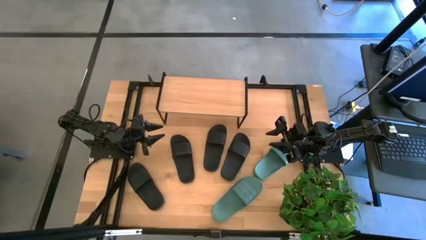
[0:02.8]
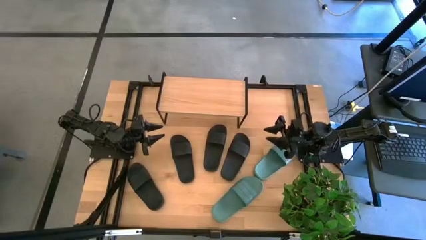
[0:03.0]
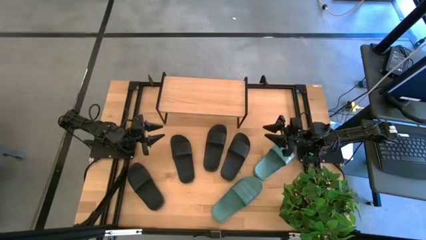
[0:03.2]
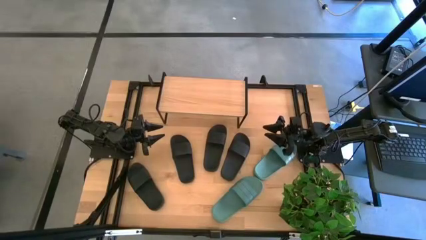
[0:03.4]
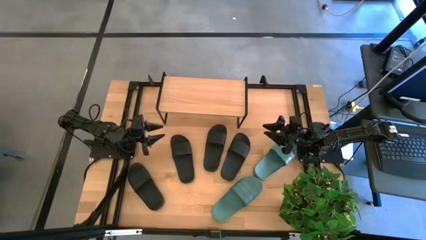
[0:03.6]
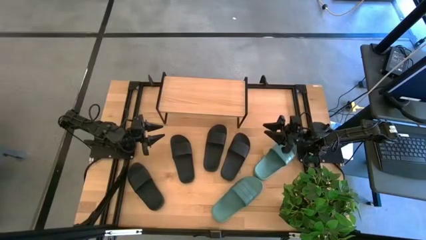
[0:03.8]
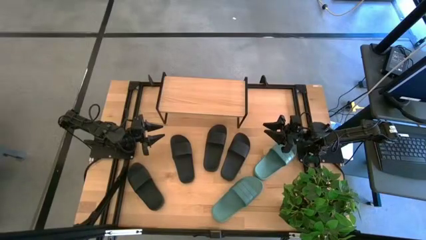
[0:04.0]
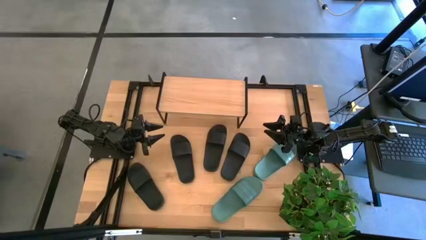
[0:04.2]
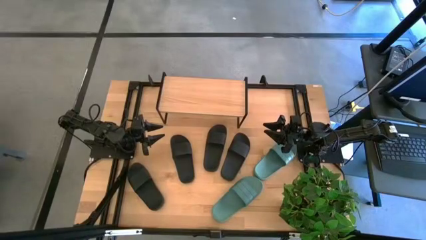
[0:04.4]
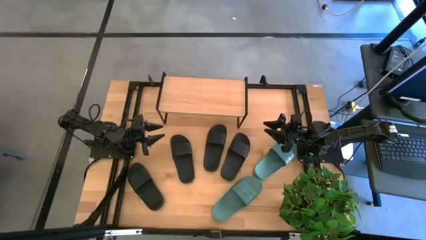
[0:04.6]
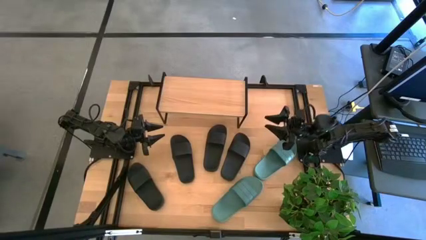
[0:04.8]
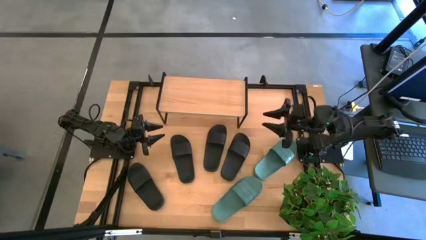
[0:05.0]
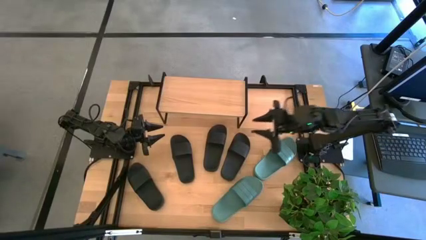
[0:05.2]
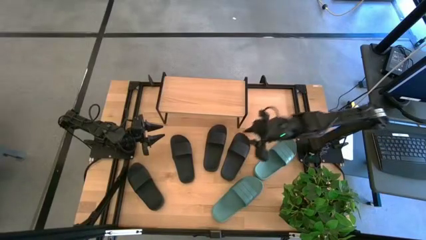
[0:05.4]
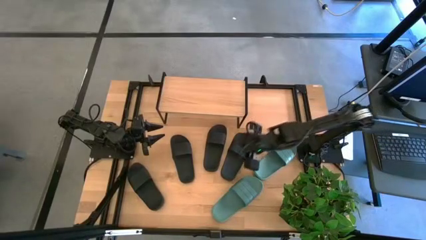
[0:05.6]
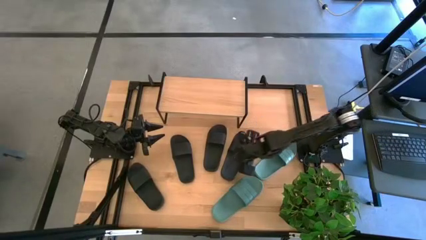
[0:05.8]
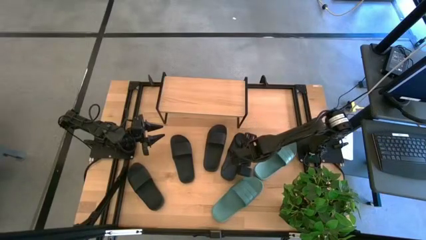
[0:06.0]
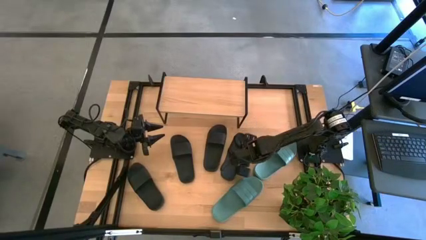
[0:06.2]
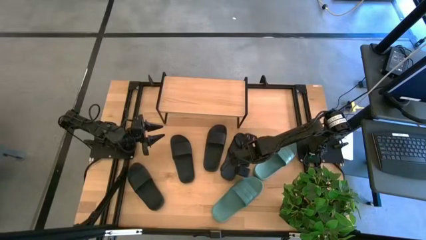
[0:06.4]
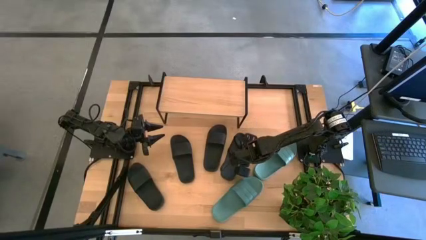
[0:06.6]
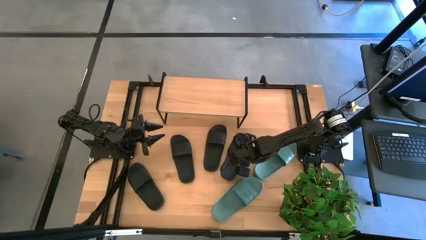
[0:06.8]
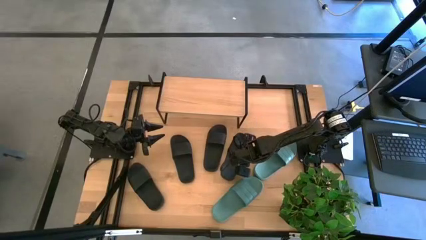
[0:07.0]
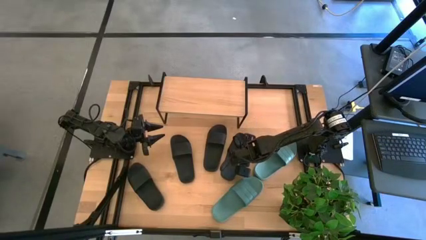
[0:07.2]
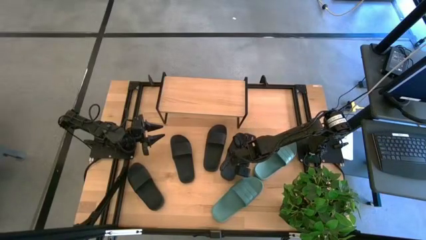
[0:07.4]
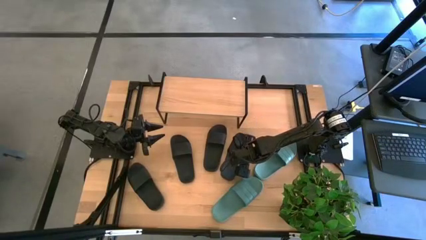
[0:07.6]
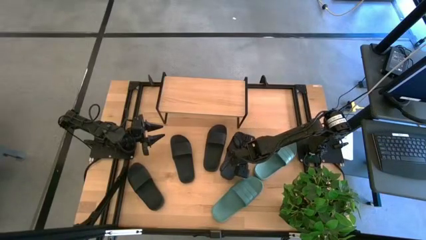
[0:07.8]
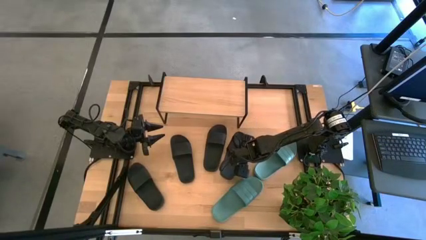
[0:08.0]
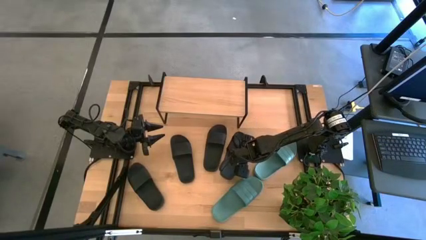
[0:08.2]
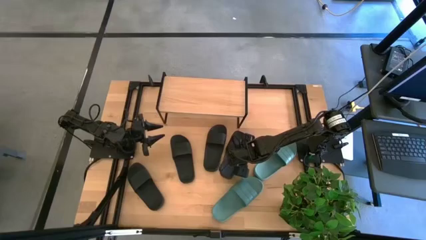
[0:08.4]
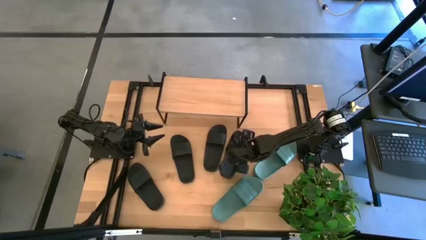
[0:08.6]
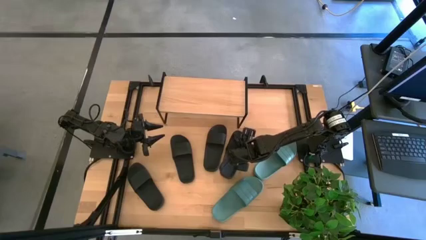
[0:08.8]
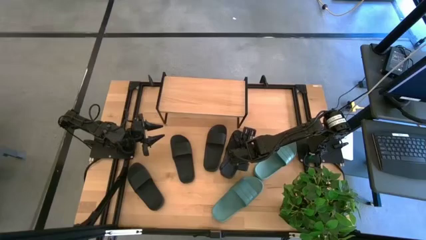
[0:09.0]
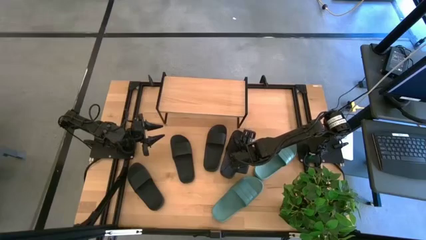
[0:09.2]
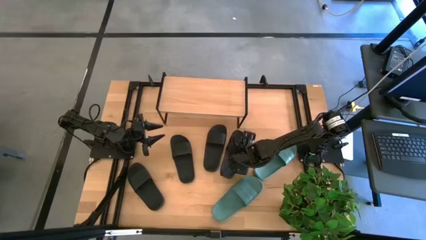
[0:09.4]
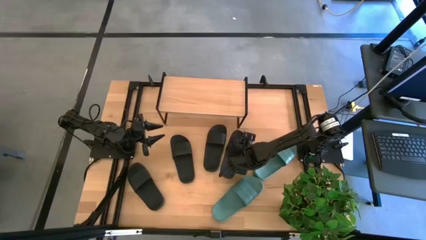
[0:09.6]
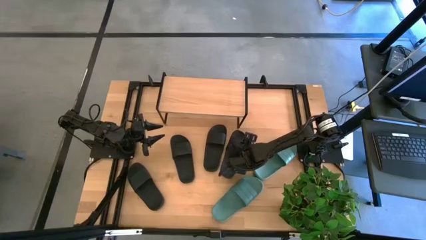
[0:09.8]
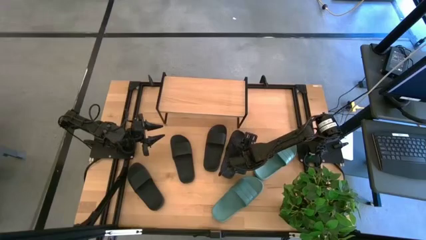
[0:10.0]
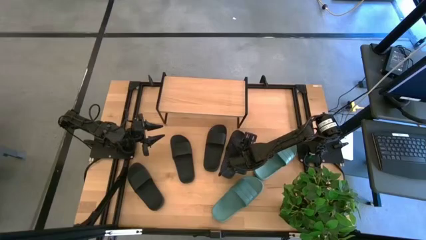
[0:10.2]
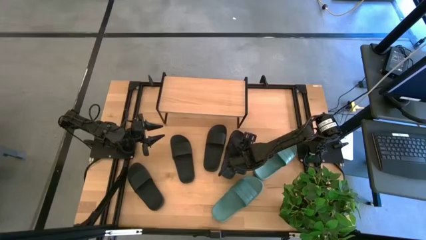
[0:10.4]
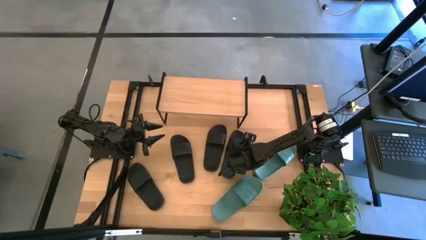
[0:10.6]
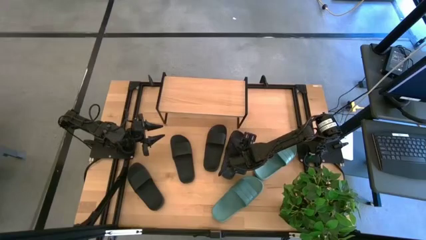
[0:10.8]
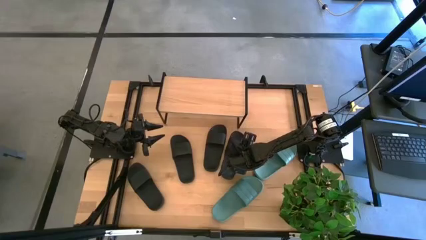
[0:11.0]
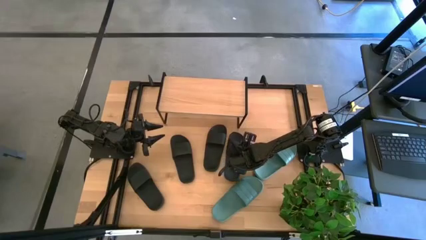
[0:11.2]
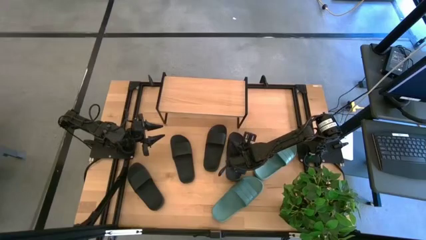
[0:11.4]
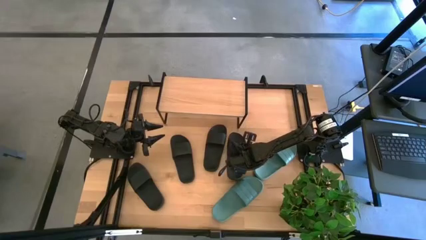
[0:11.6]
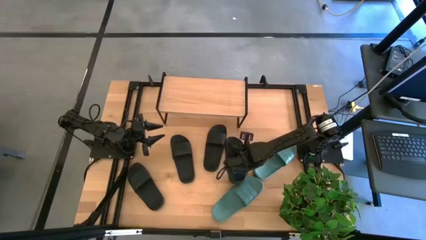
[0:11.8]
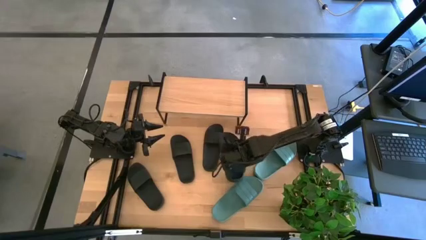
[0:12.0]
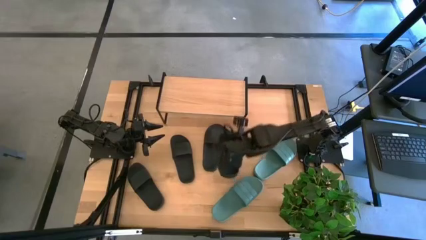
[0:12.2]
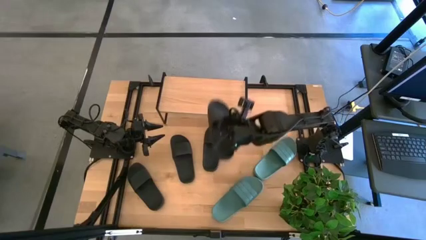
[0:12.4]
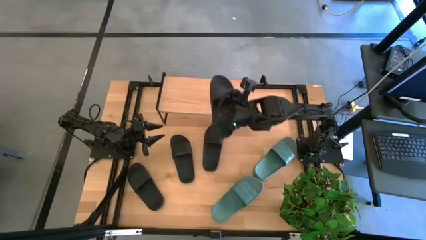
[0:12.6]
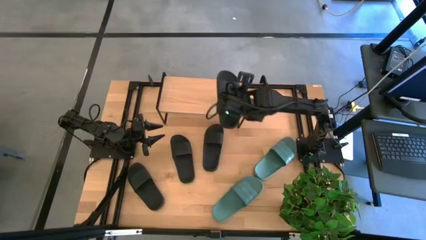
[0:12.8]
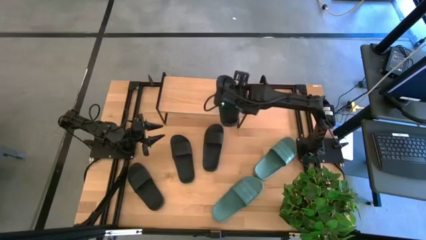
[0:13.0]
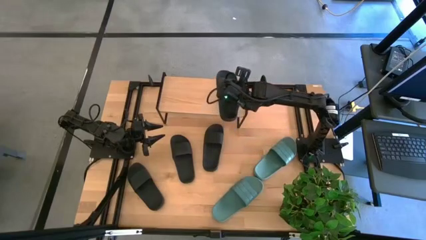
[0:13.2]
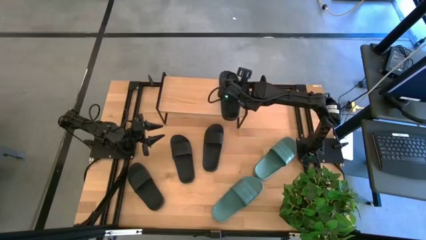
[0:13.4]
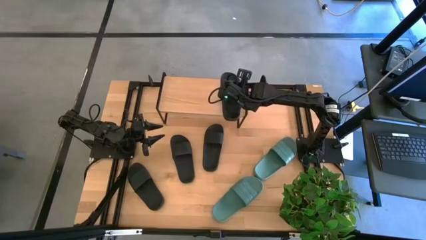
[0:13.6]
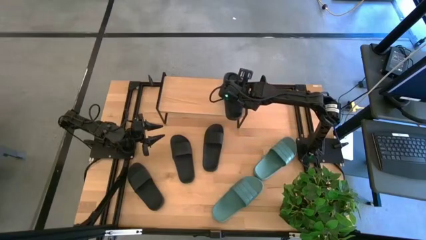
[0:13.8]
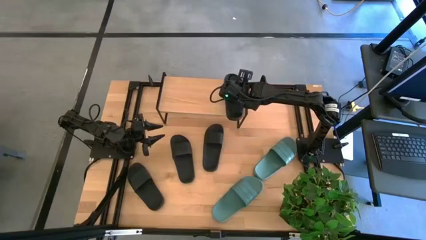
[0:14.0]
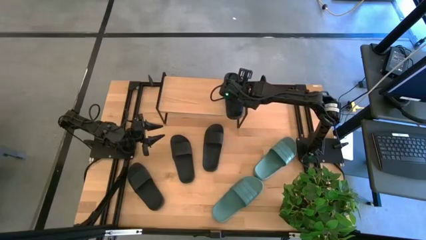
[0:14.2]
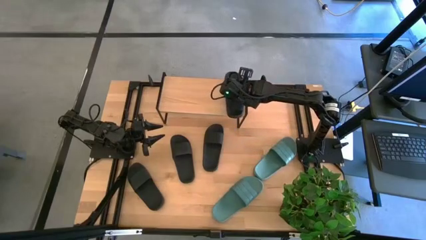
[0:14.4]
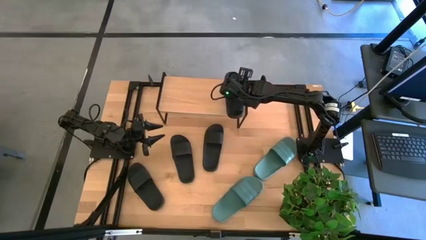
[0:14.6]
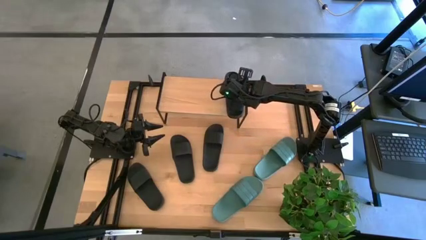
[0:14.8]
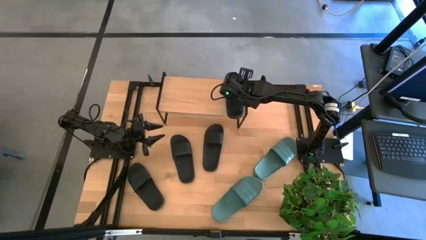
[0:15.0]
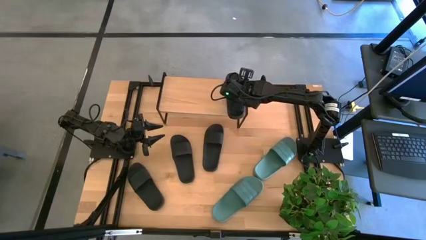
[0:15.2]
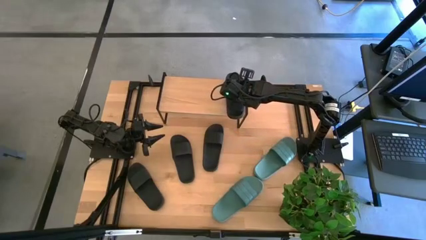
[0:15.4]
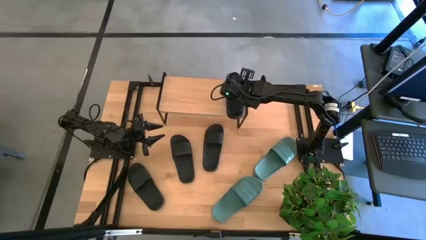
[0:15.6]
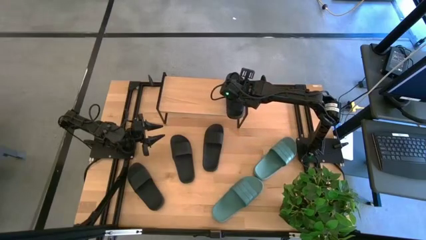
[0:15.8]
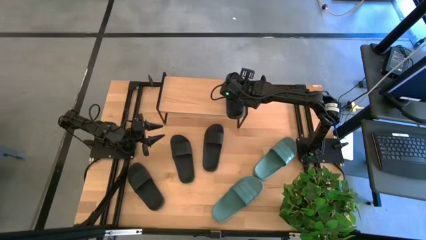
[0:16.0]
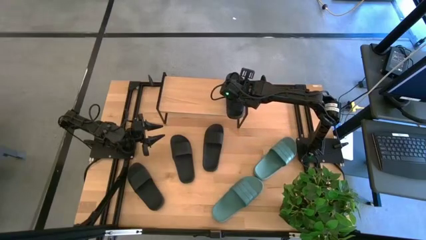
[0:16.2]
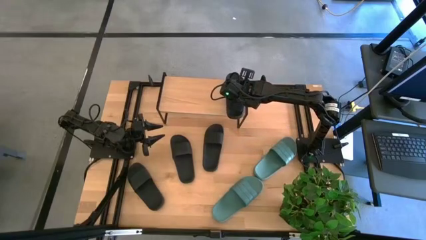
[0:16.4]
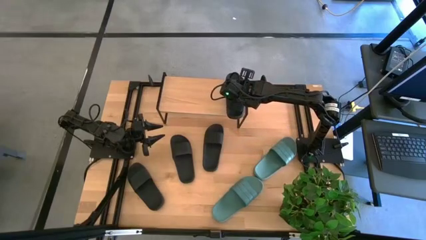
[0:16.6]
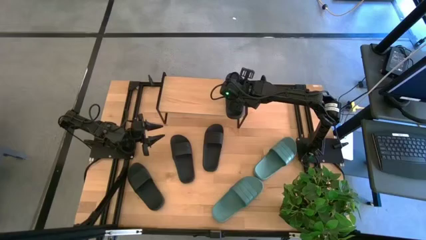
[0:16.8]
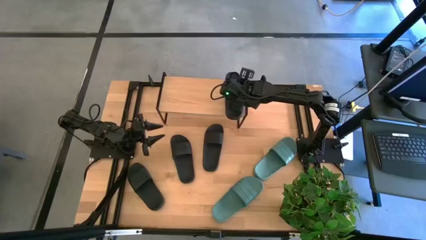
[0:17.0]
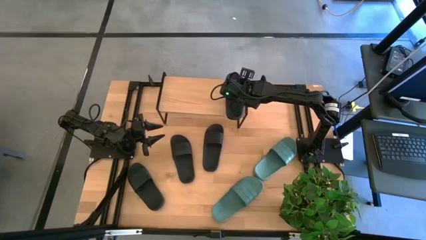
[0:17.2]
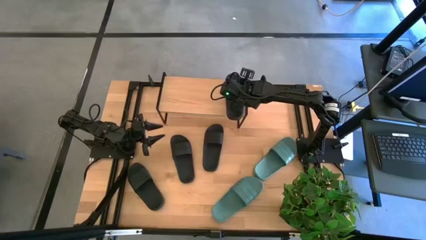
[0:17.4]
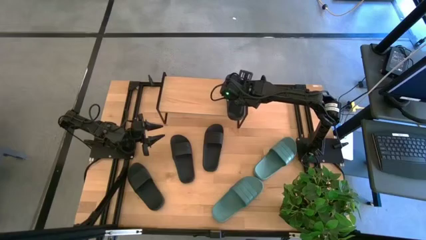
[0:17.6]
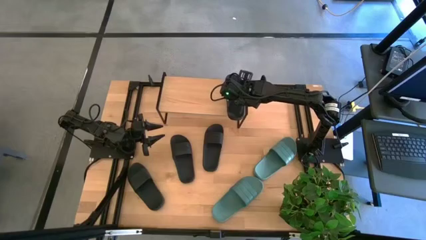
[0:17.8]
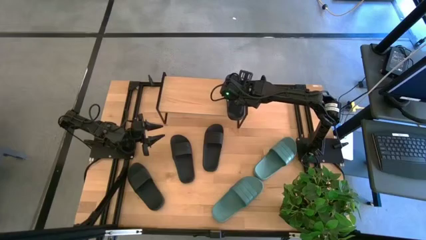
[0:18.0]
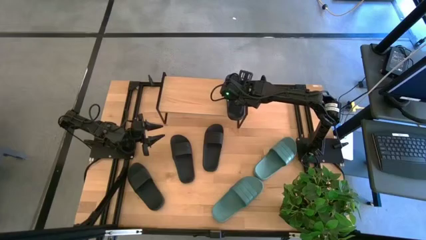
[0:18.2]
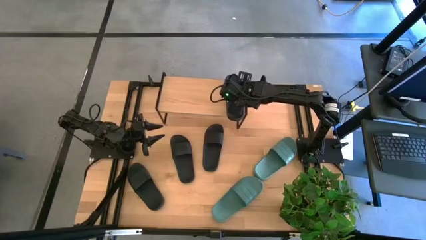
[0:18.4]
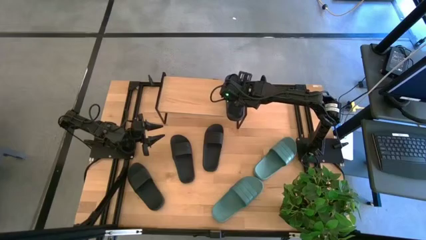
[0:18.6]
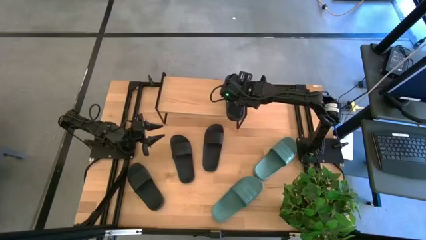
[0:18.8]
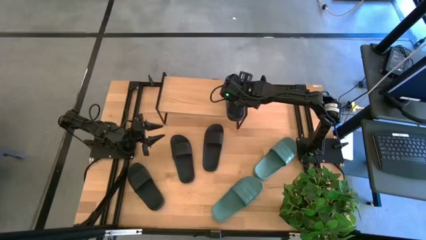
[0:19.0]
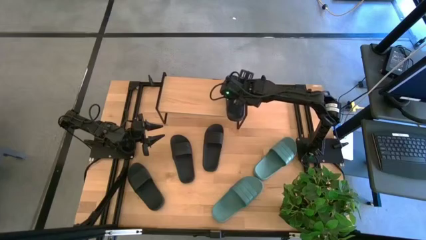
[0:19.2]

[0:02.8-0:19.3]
Task: Pick and place slides into the shelf
Put the black slide on the shelf
